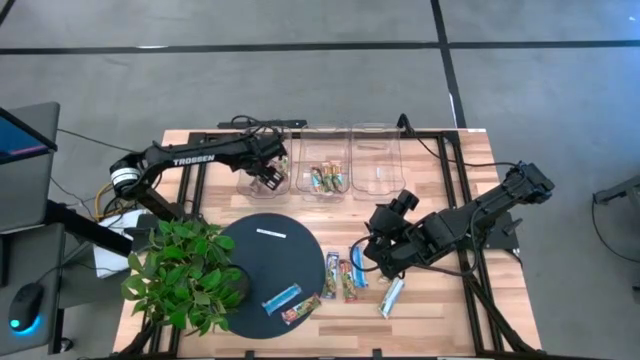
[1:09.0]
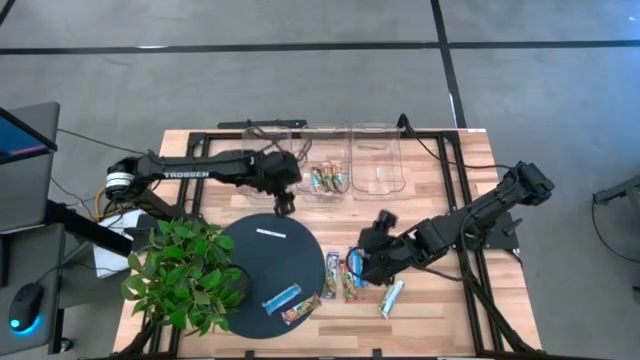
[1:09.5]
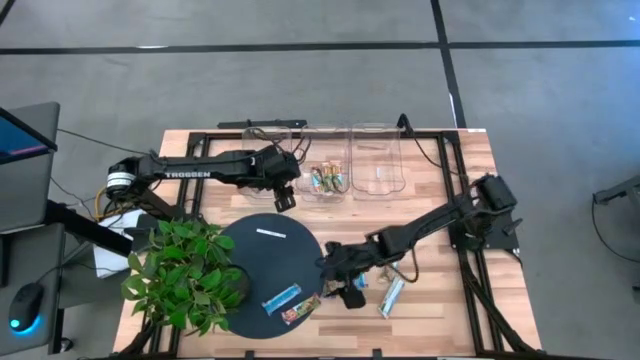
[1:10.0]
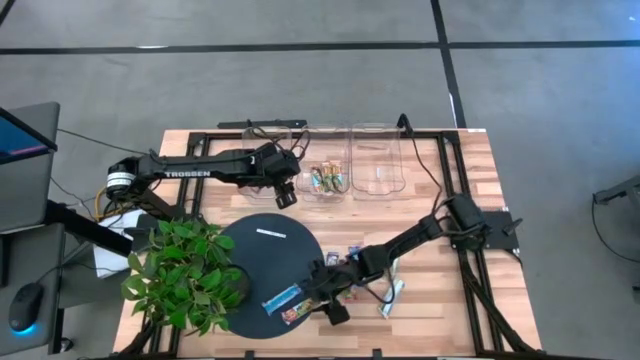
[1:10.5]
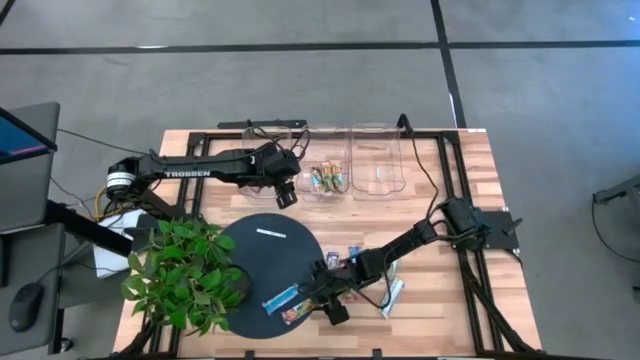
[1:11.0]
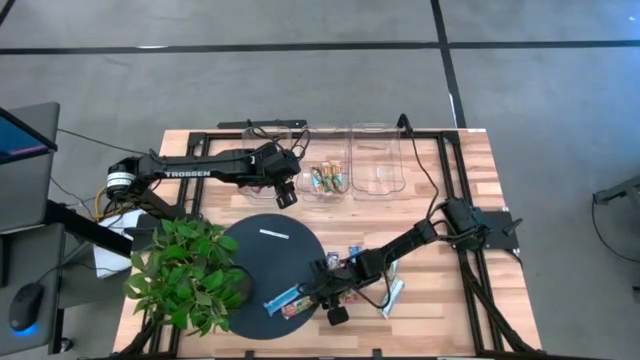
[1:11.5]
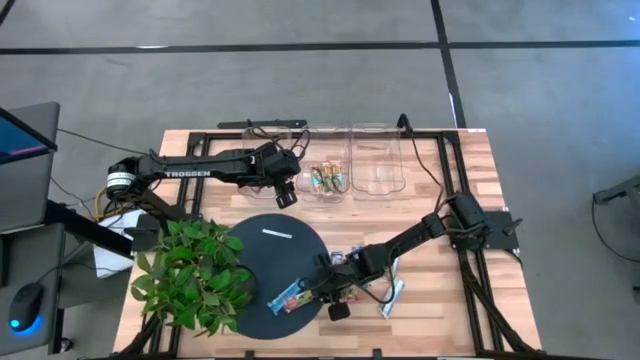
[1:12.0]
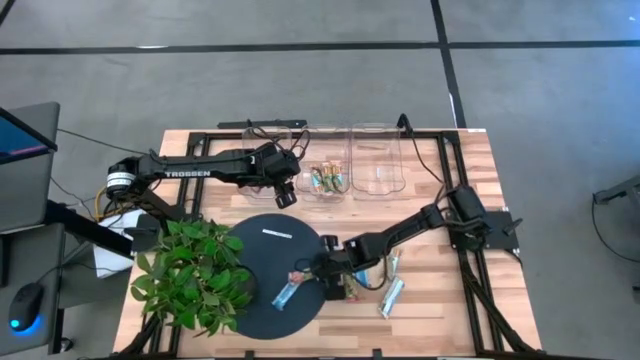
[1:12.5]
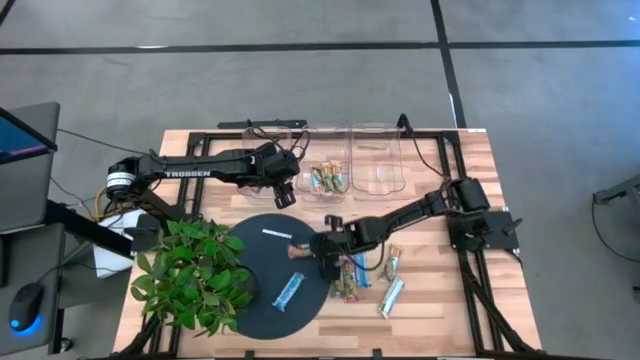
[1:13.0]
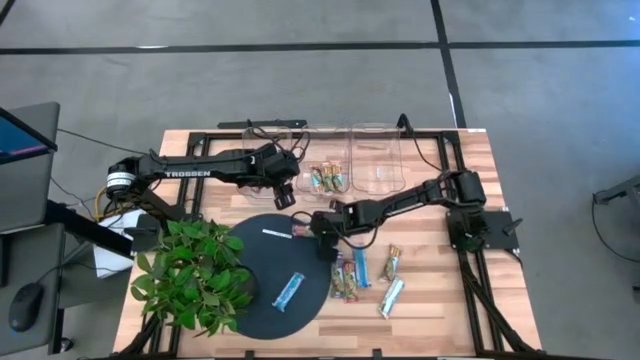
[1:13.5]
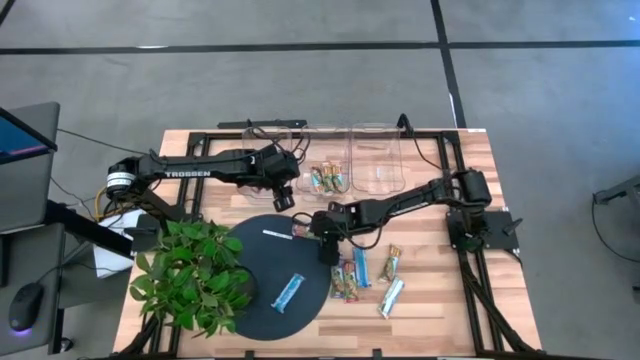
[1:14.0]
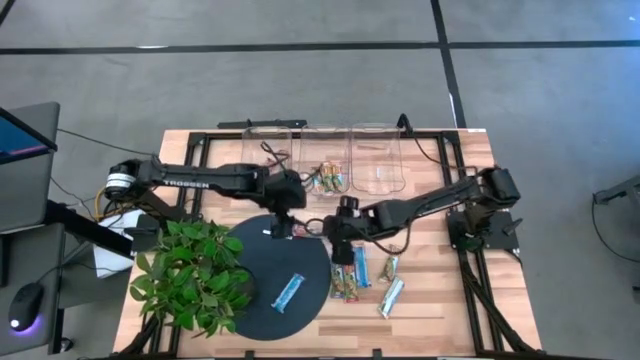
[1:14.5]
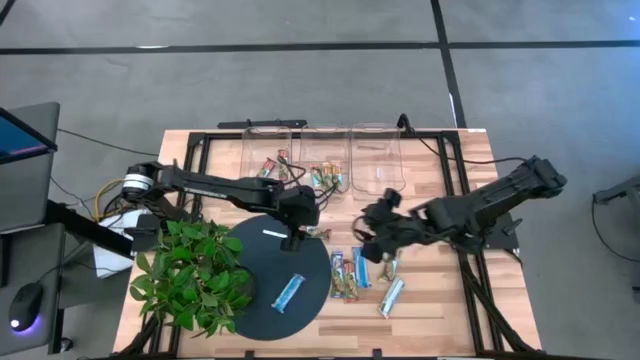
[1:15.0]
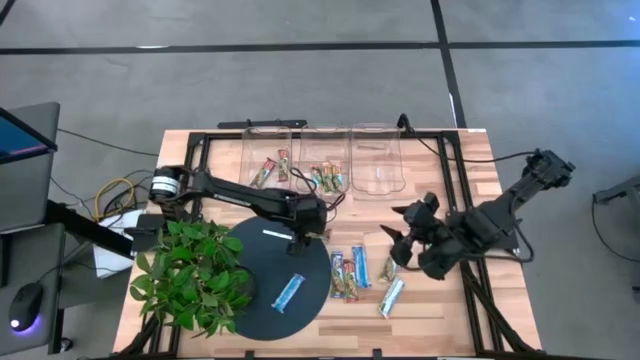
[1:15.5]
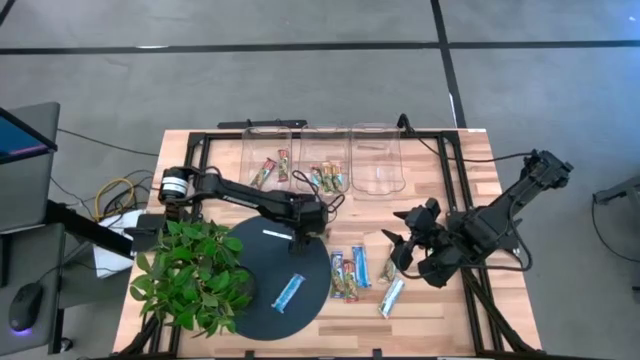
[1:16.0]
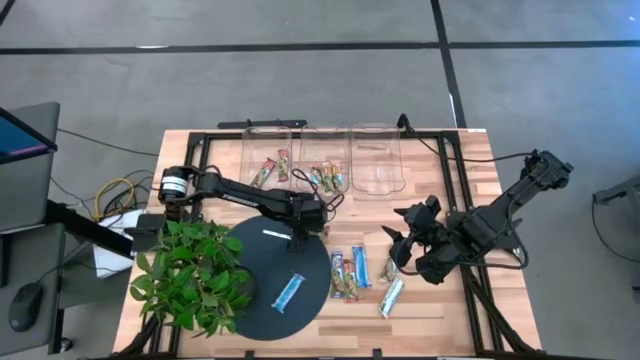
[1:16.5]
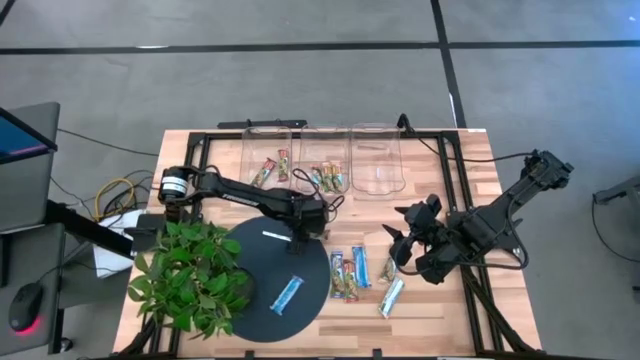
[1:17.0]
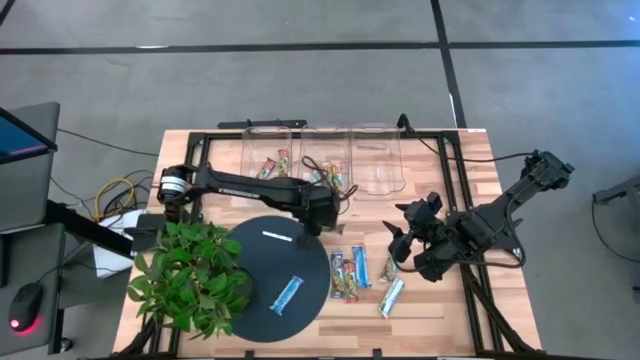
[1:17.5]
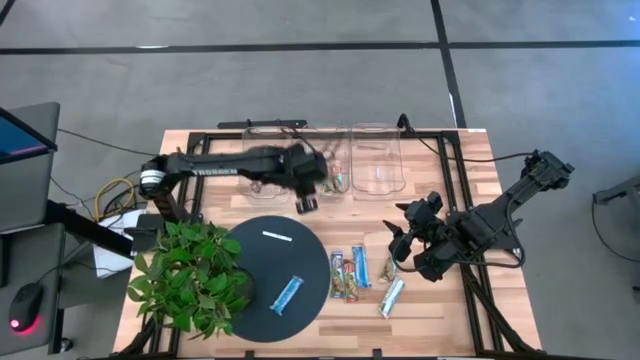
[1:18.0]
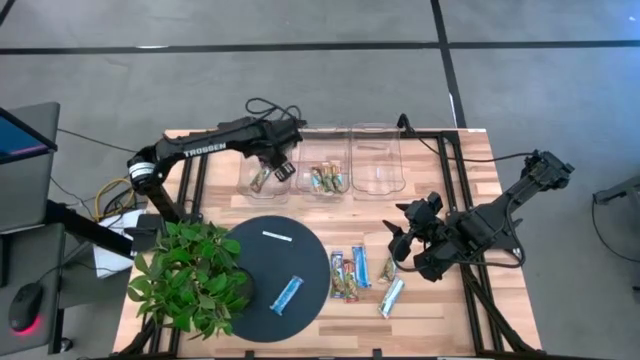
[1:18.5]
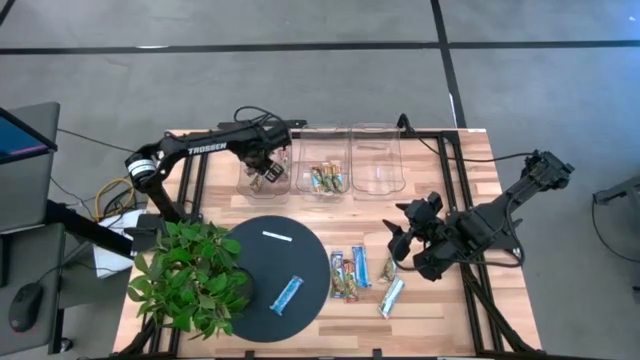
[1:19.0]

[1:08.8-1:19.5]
Task: Pick and place Granola Bars by type
Put the red granola bar into the left transparent bin

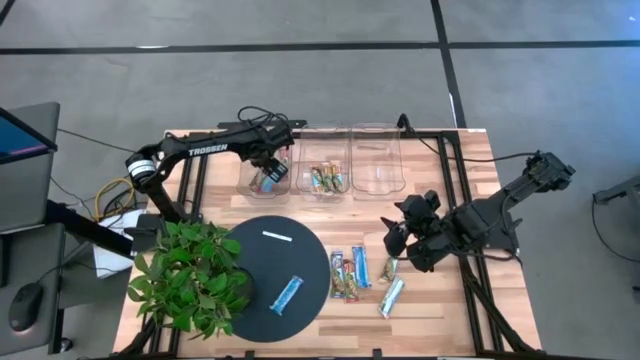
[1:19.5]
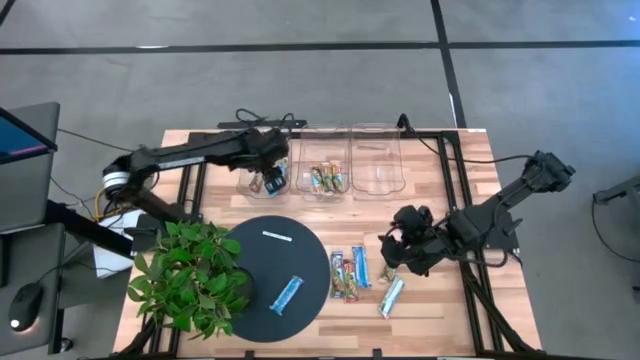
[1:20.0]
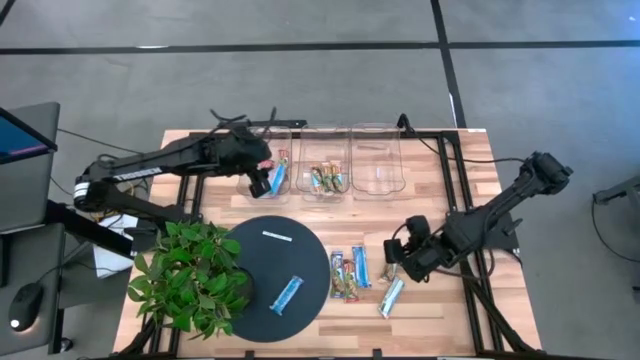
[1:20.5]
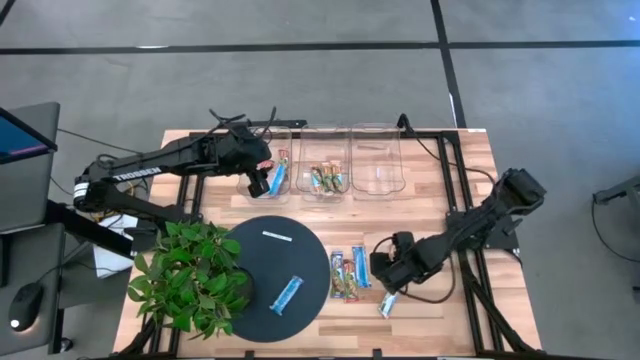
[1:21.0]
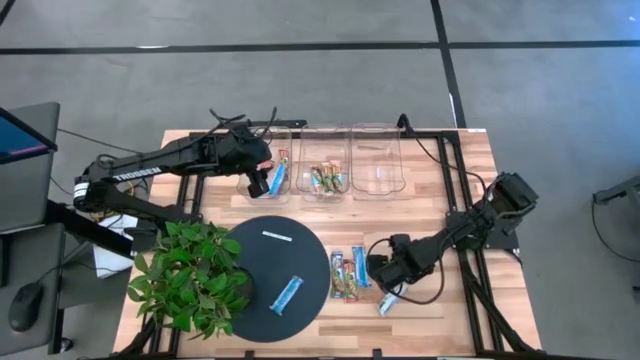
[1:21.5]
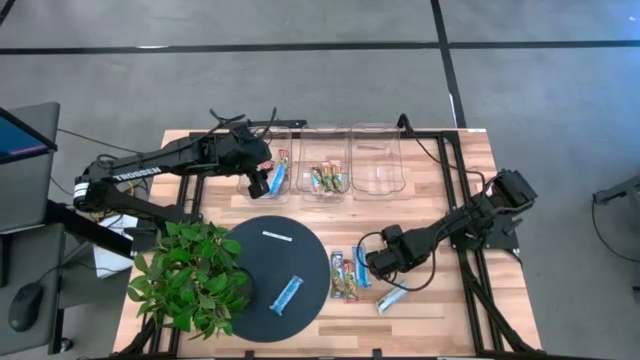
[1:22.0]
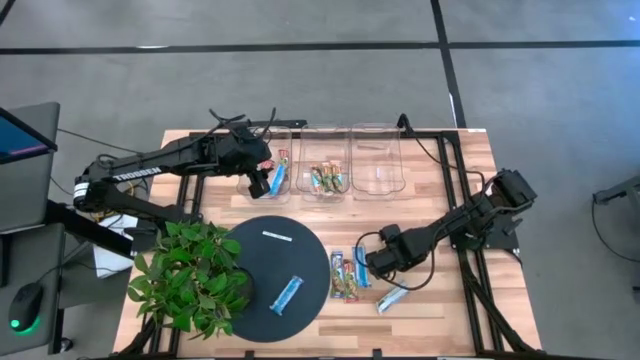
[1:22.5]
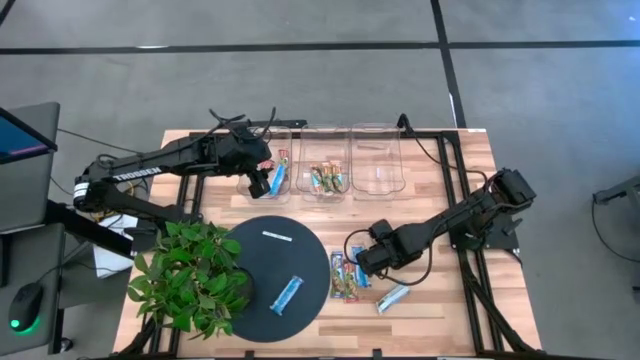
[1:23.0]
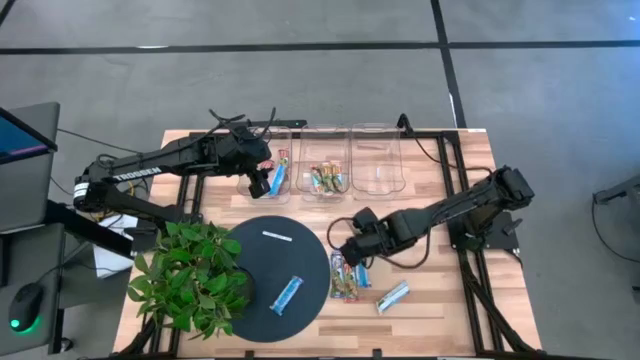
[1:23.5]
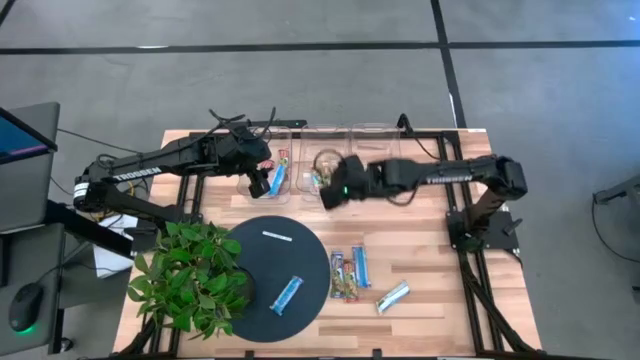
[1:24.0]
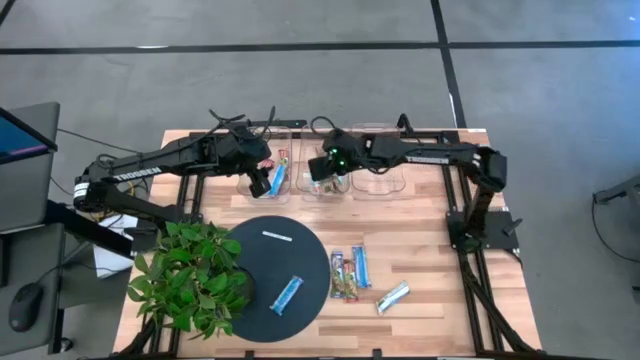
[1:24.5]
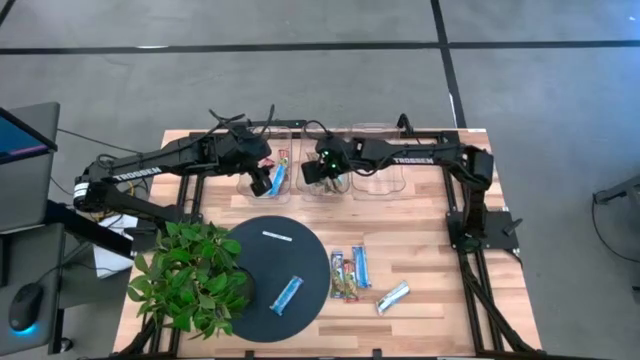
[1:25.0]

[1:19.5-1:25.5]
Put the yellow granola bar into the middle transparent bin

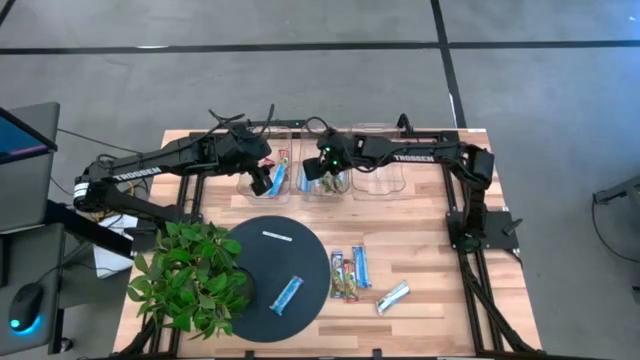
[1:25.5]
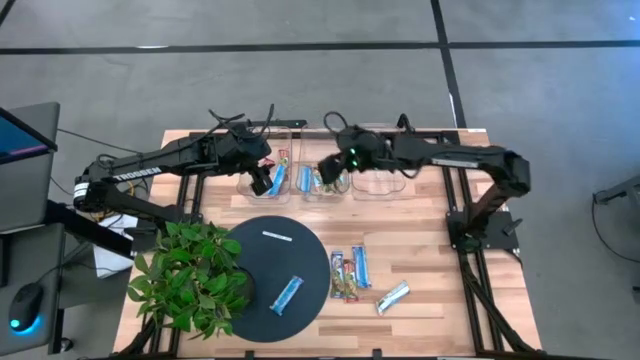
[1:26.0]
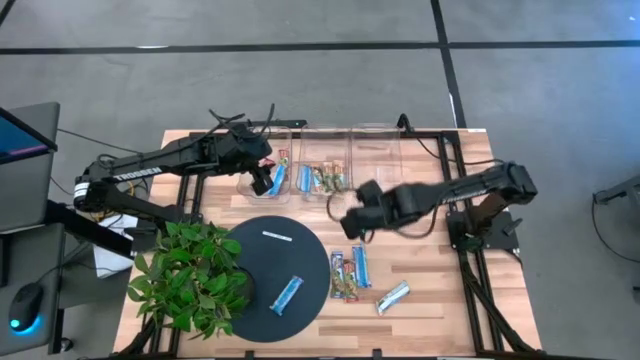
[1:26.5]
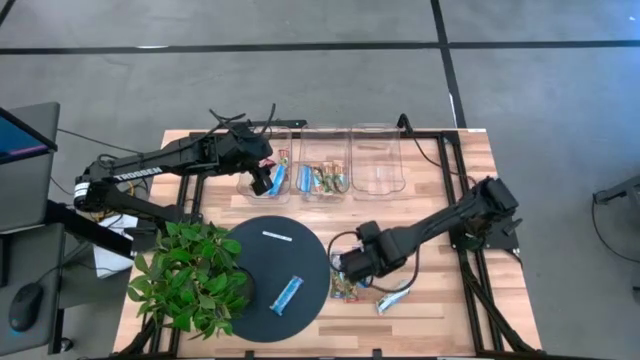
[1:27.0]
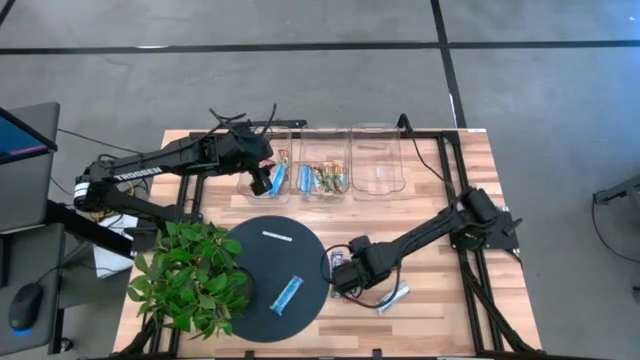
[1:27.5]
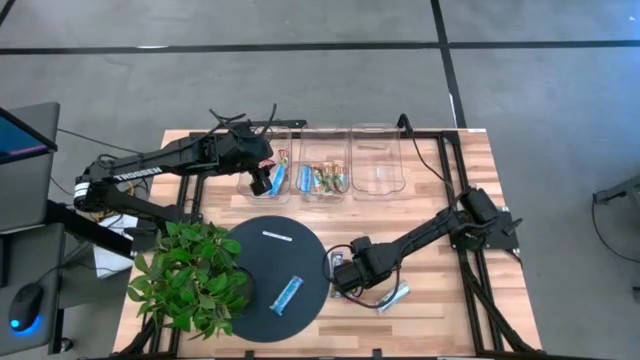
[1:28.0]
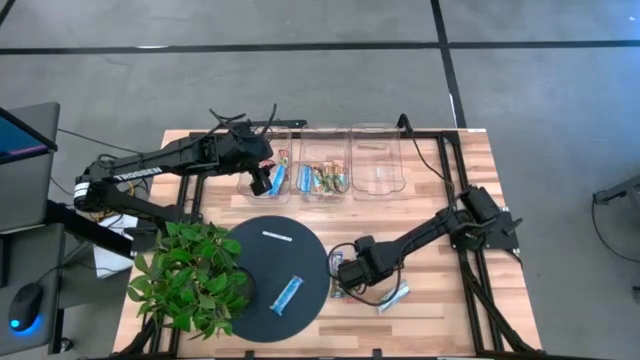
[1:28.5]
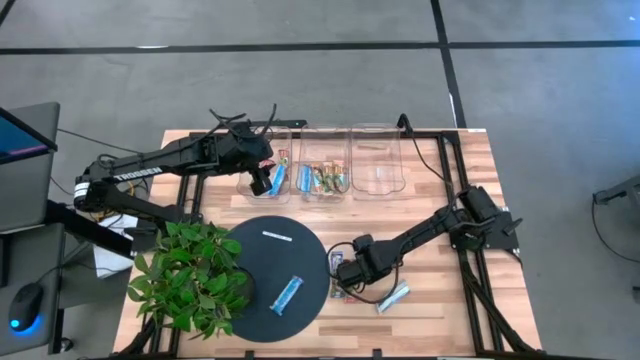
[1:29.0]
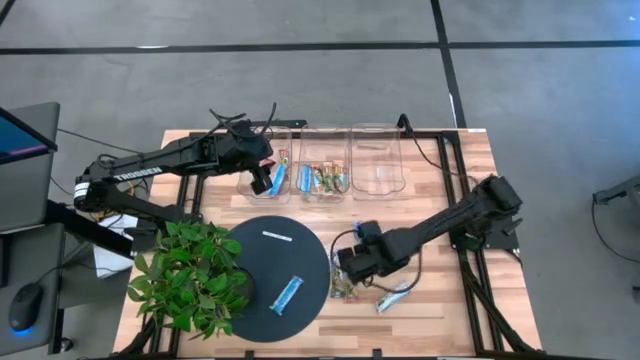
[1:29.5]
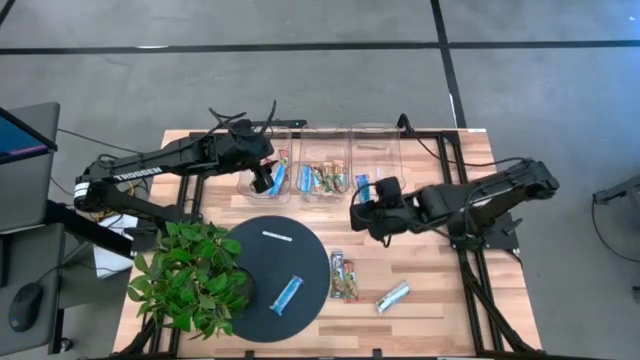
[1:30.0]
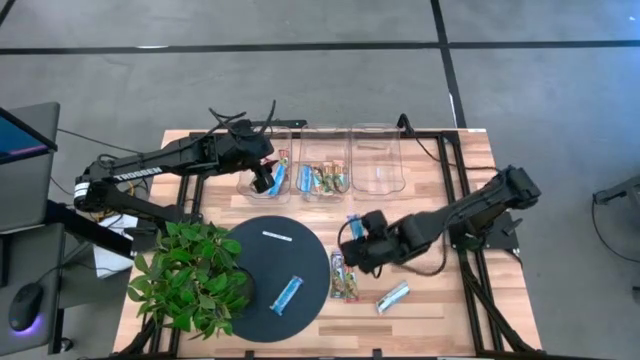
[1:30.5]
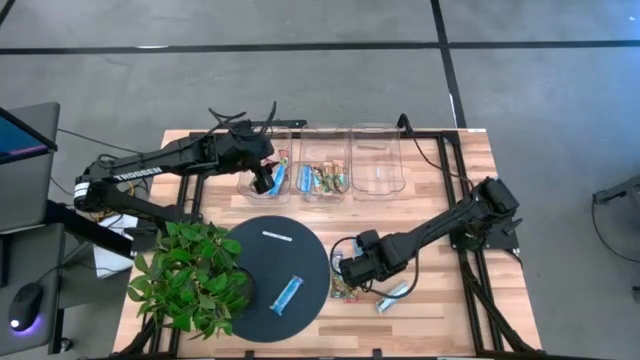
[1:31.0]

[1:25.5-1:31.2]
Put the blue granola bar into the right transparent bin
